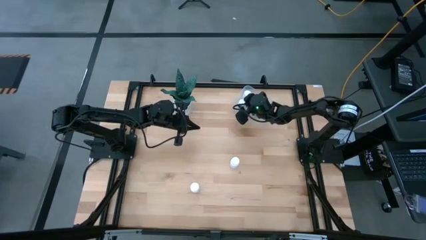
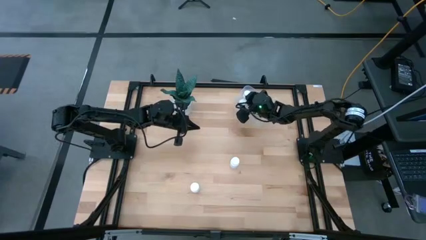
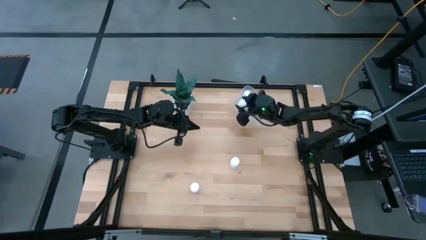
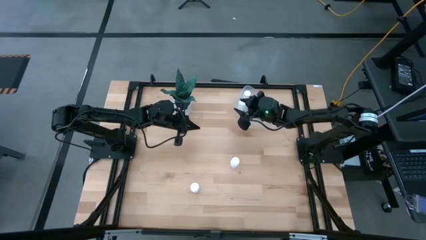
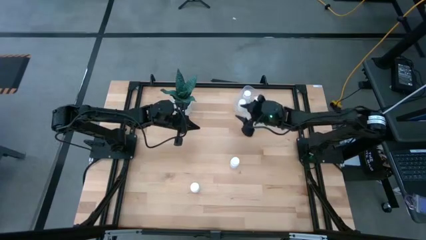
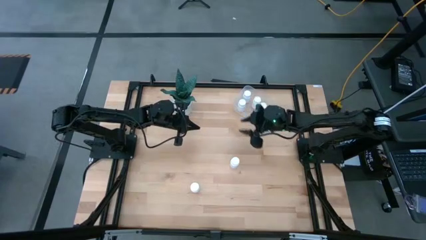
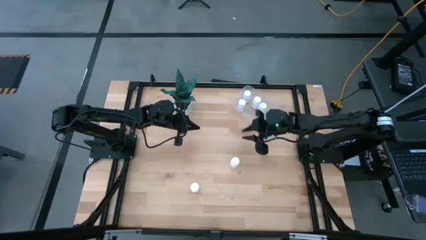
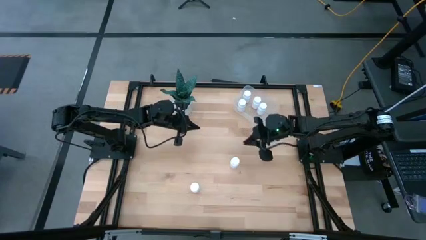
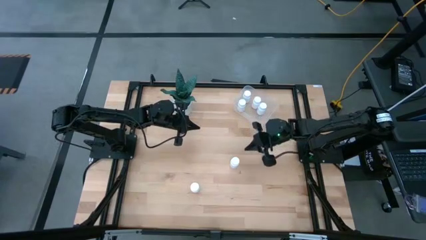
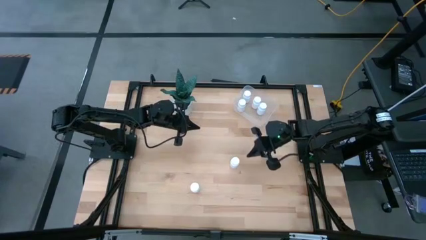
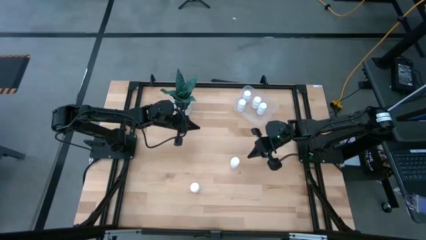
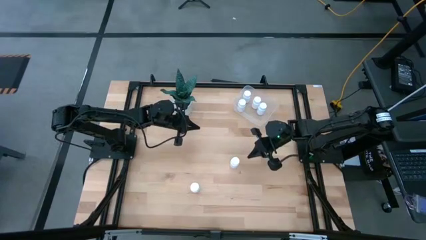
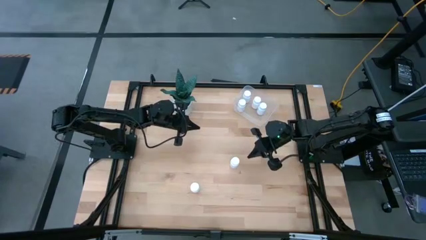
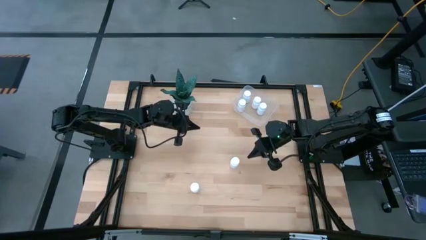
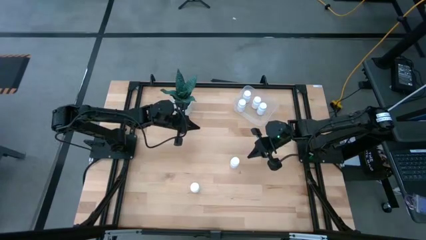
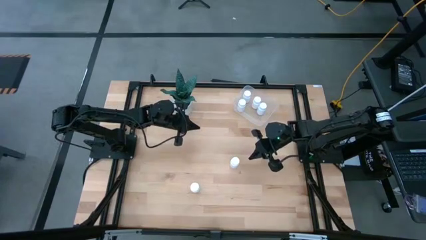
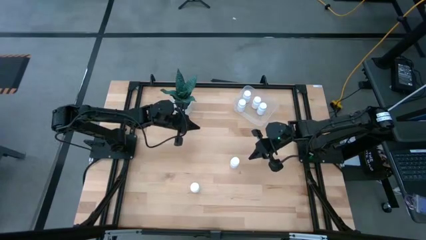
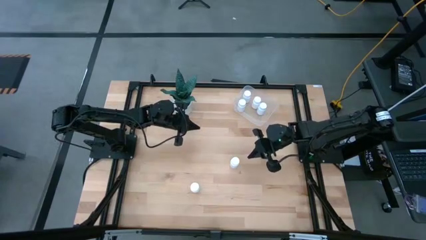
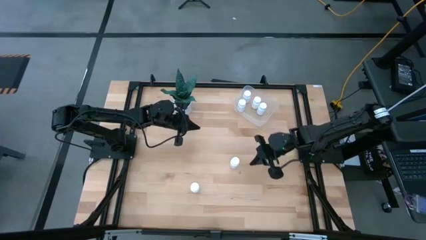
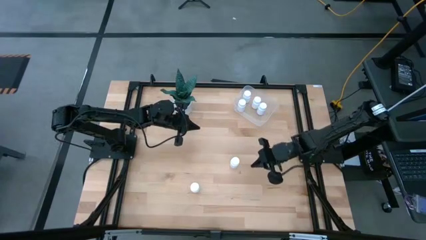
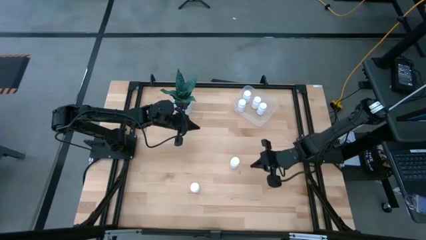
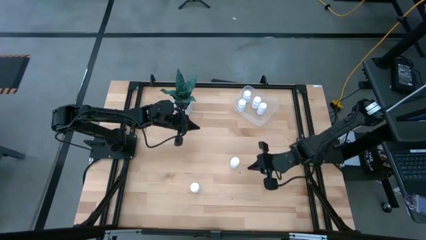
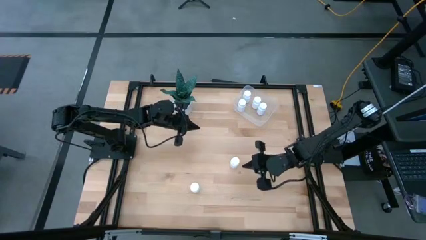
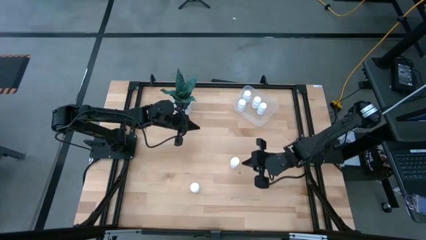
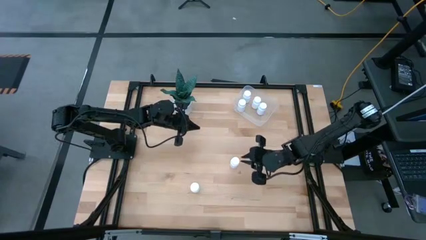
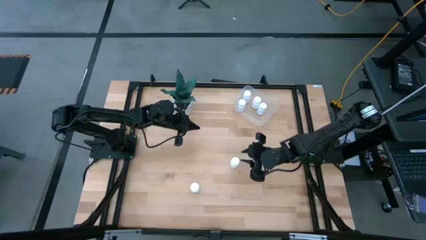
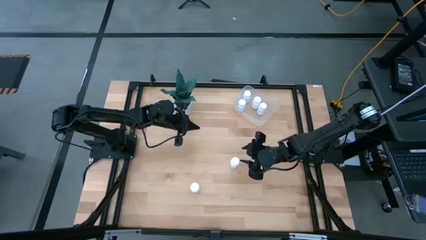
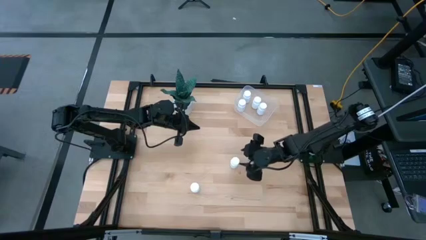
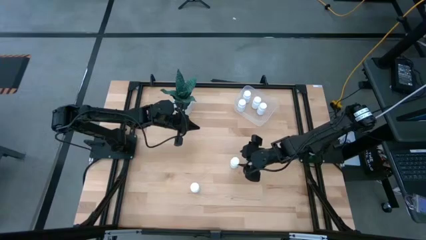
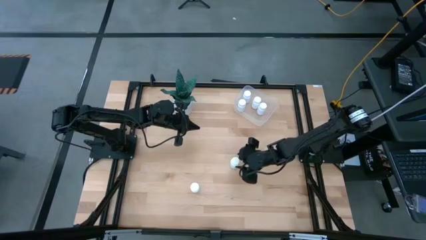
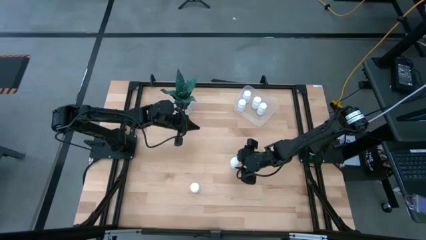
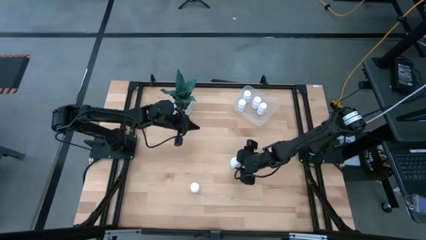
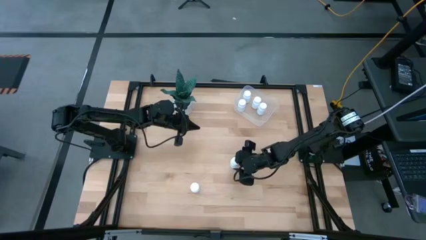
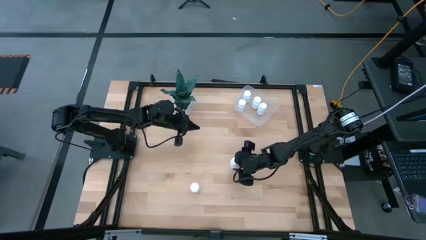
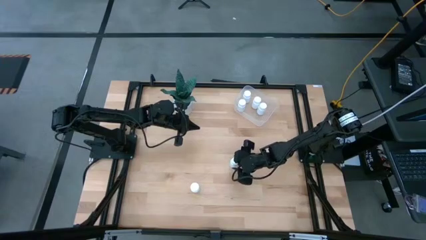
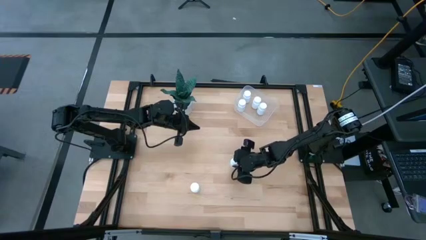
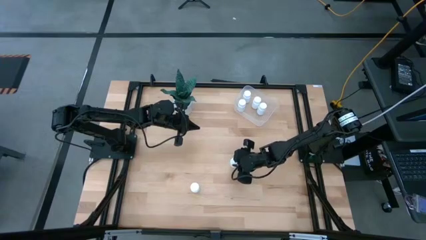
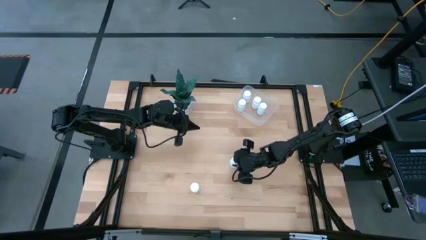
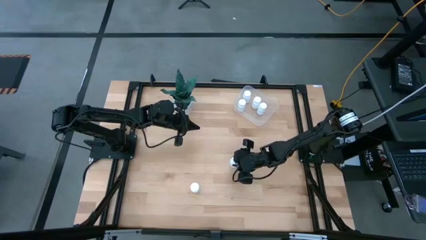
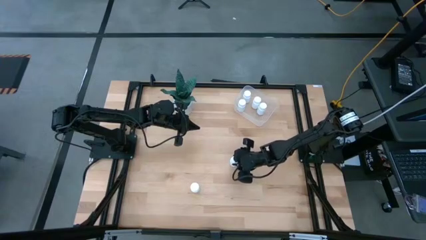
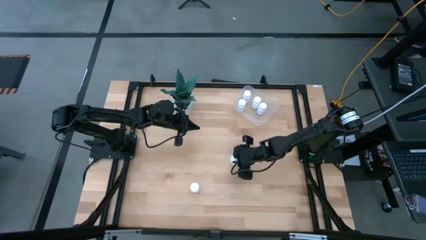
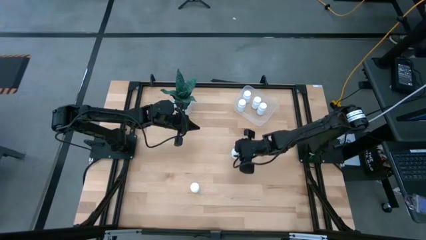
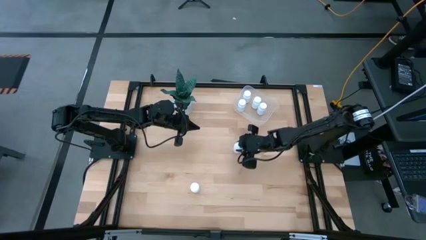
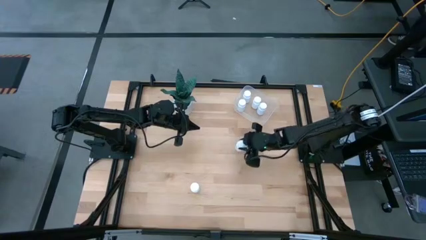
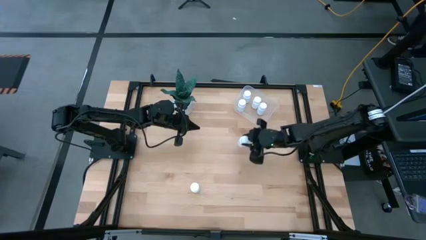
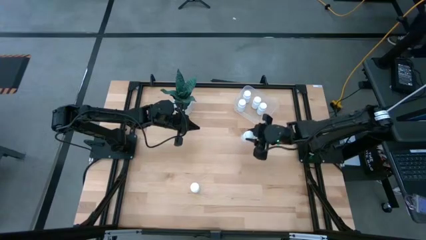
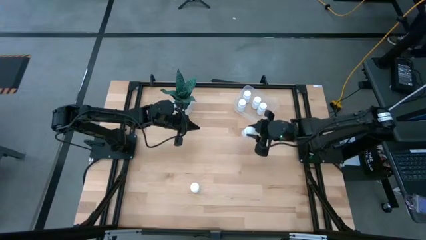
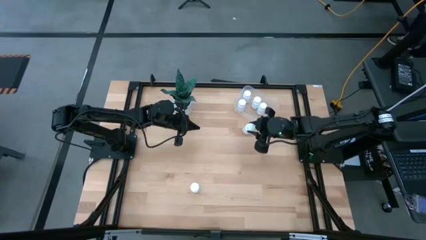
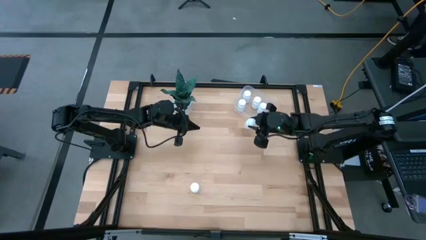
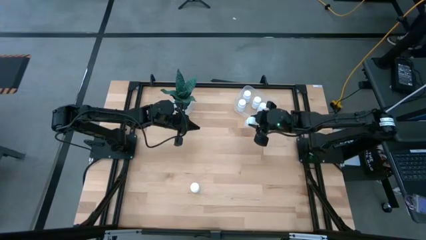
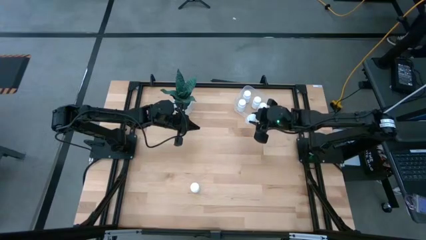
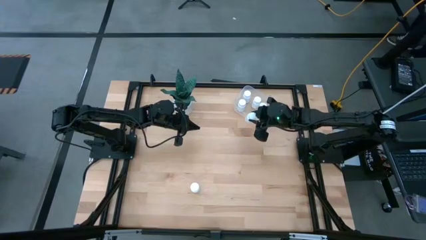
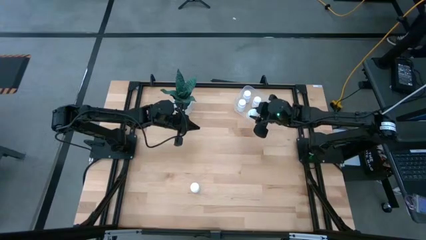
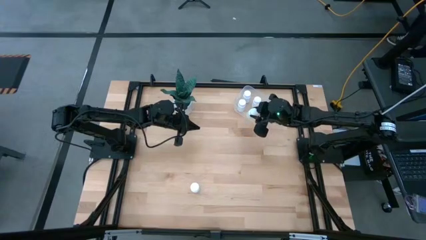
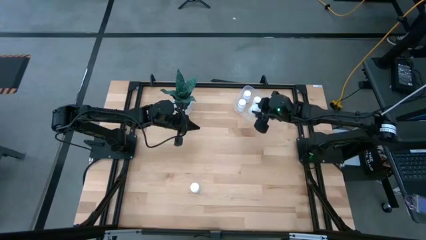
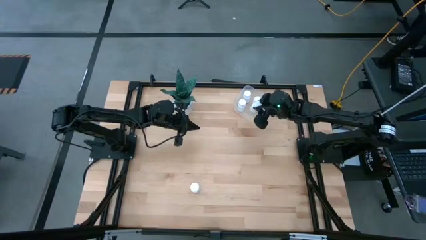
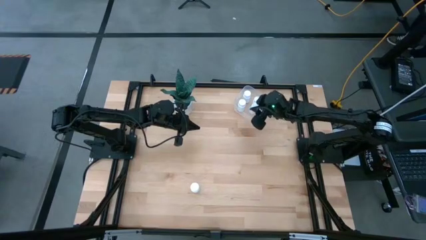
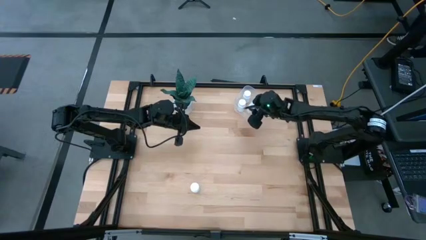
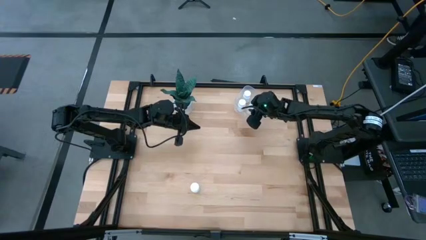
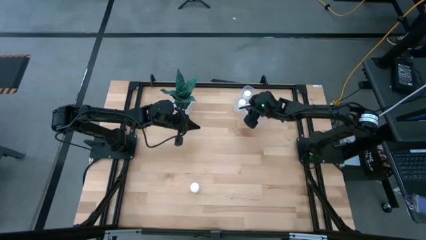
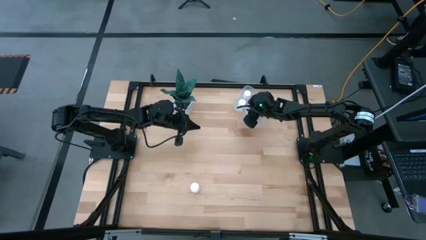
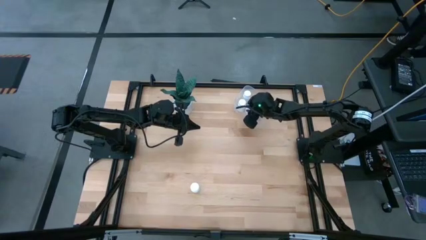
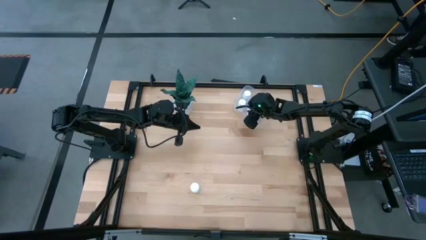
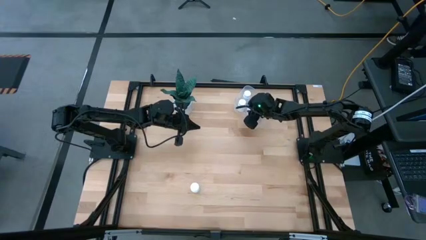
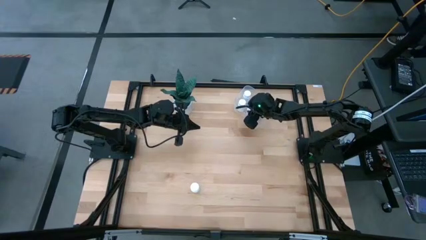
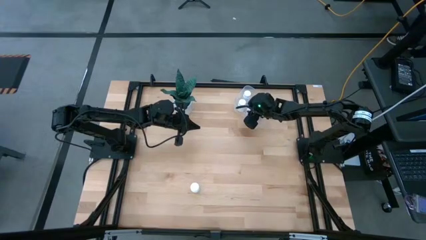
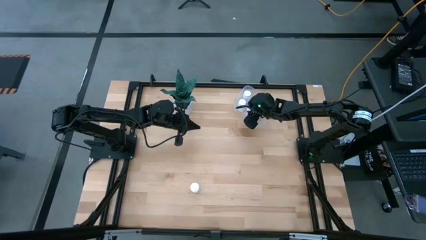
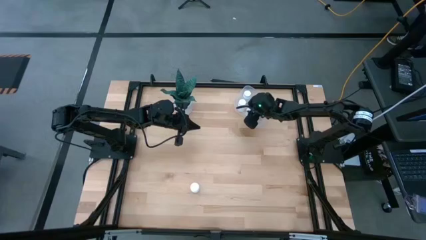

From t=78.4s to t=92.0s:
Task: Pick and place pill bottles into a basket
Put the white pill bottle into the transparent bin
